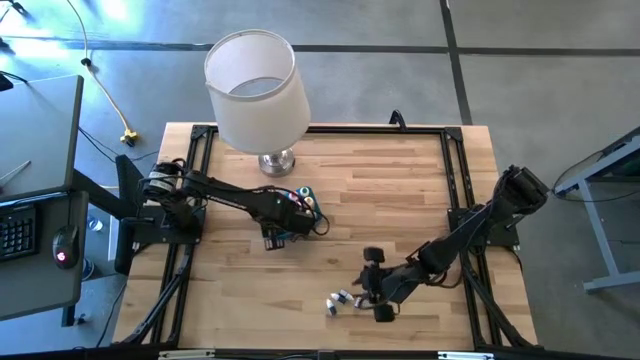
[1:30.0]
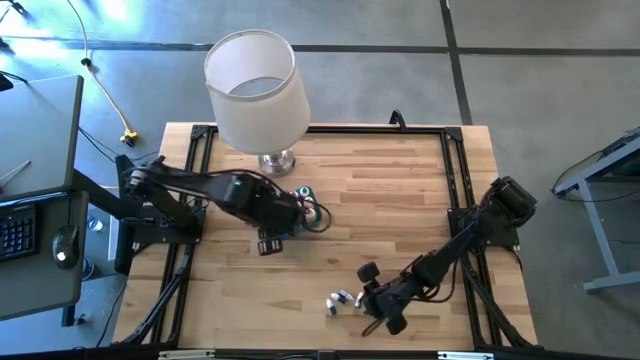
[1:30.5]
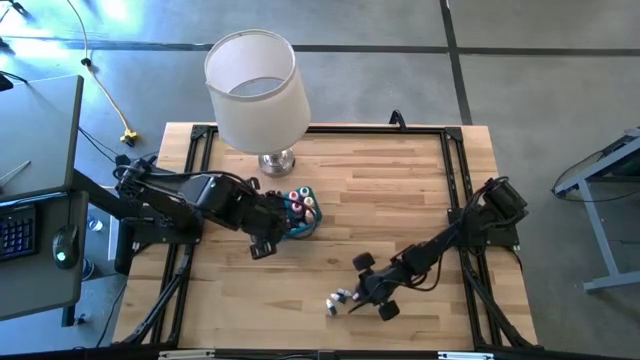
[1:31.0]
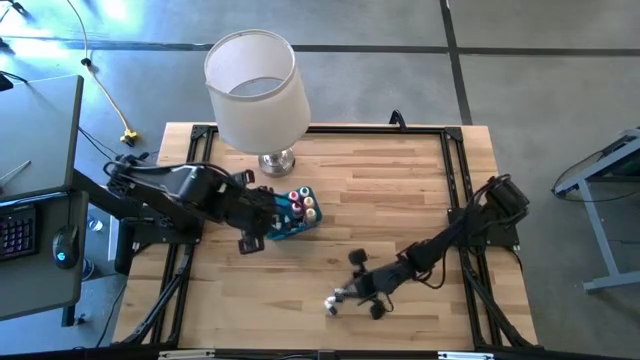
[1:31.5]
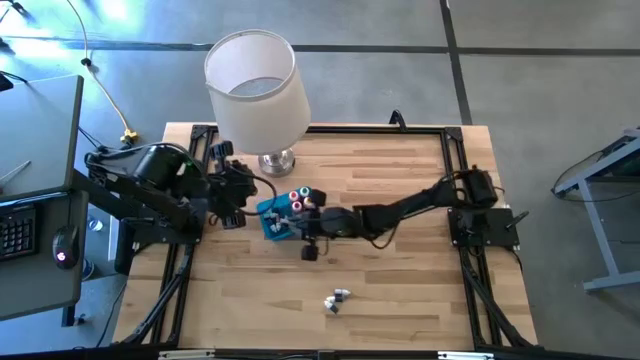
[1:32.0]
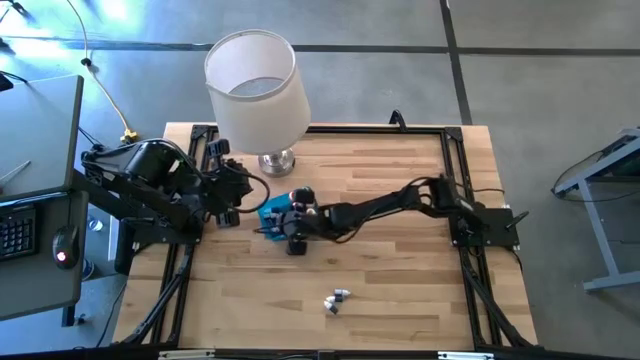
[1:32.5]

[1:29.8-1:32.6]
Task: Pick & Place food coloring
Put the small purple food coloring bottle into the blue bin

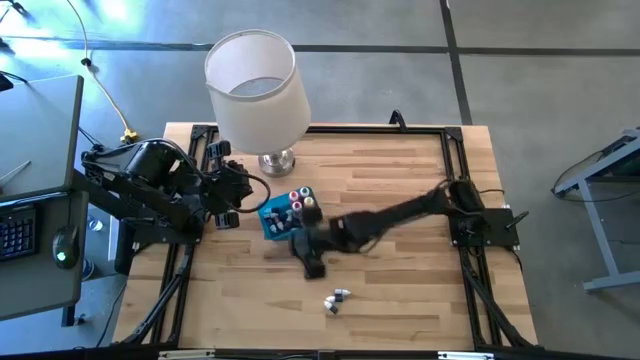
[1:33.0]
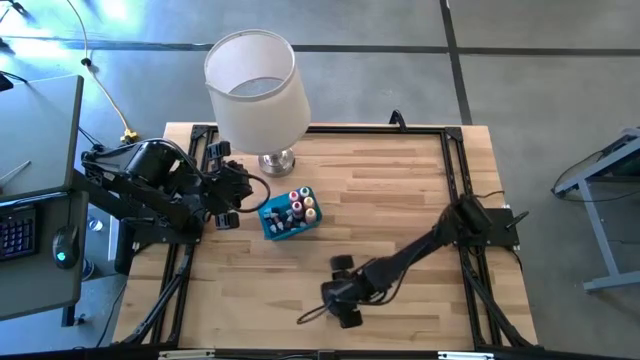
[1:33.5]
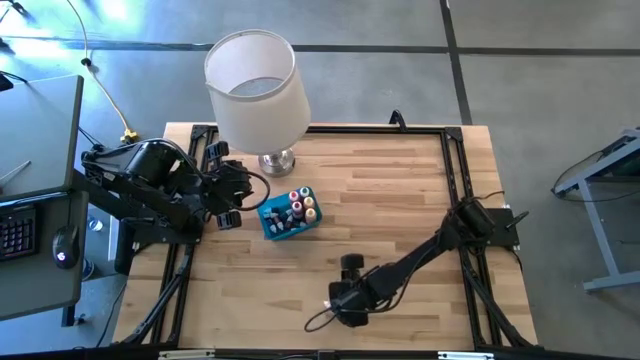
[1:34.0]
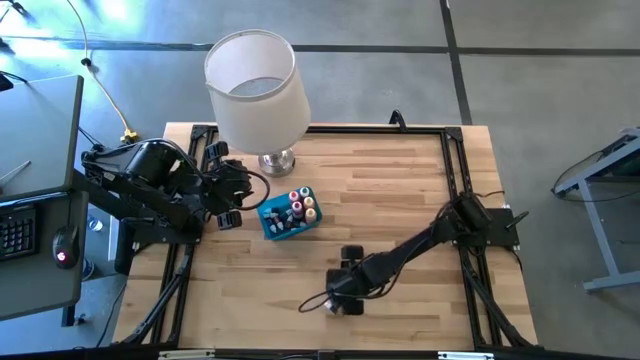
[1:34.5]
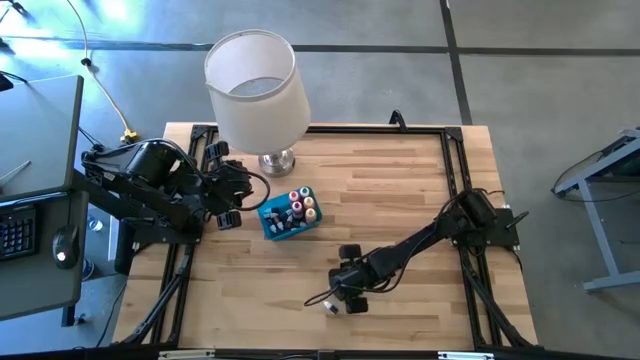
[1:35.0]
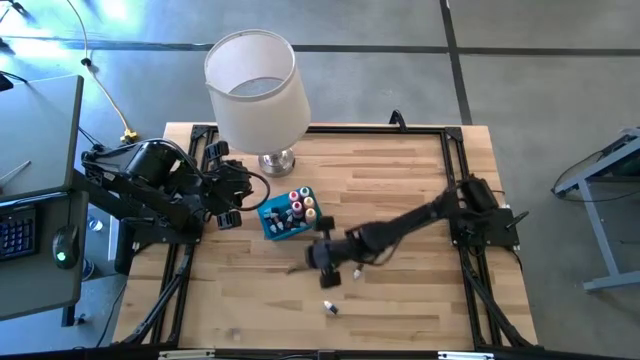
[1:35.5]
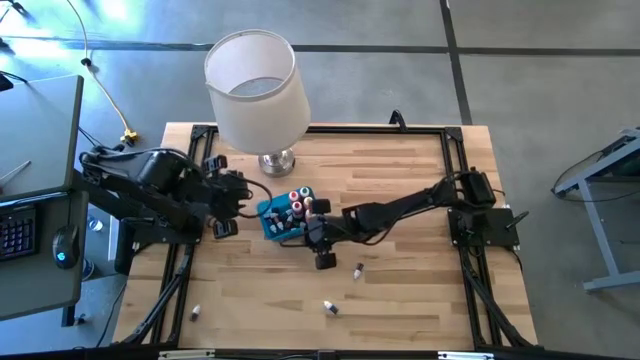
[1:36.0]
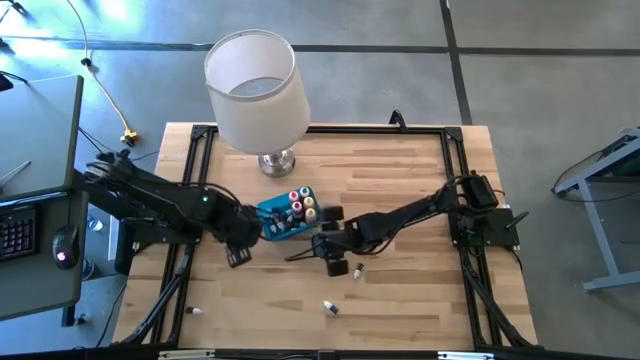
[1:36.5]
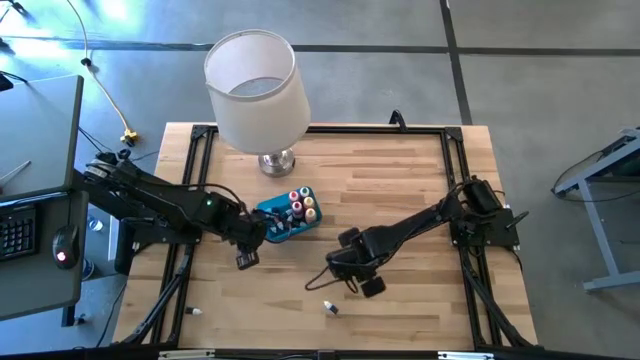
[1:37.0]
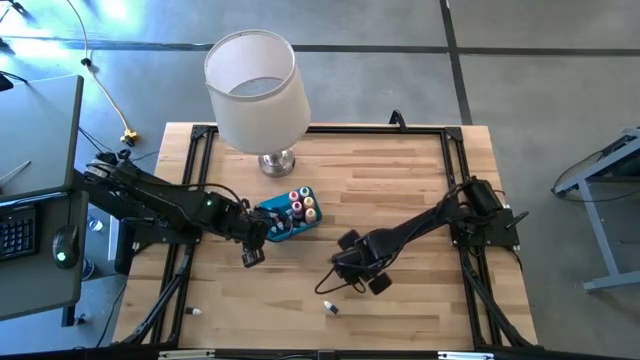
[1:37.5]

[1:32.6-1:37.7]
Put the small purple food coloring bottle into the blue bin

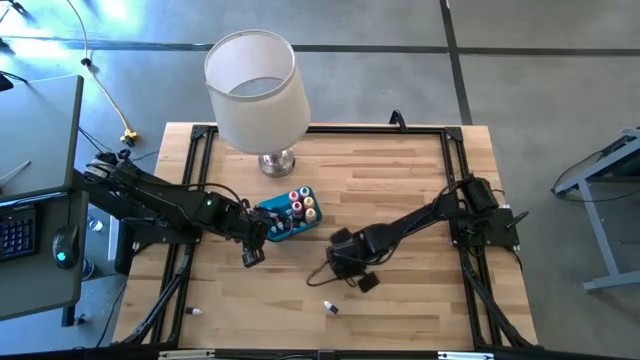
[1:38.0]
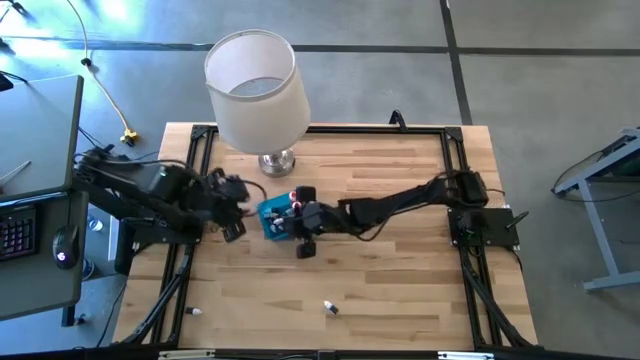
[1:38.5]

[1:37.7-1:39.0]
Put the small black food coloring bottle into the blue bin

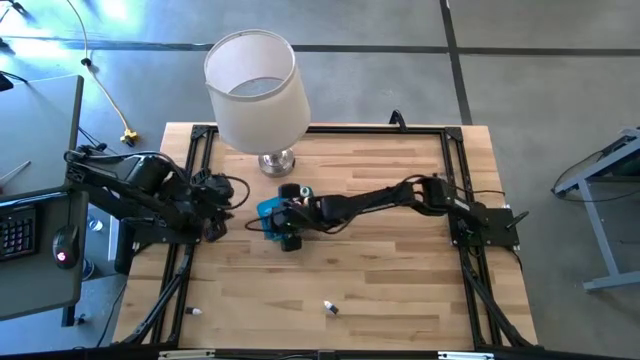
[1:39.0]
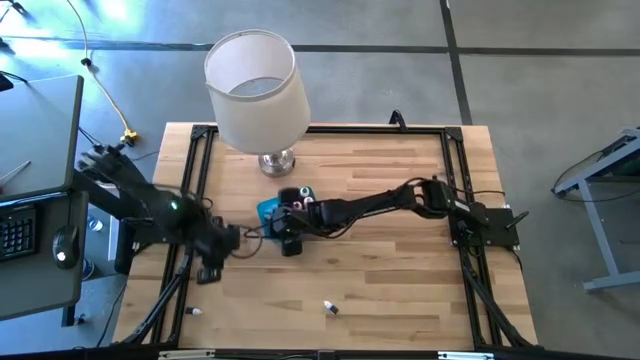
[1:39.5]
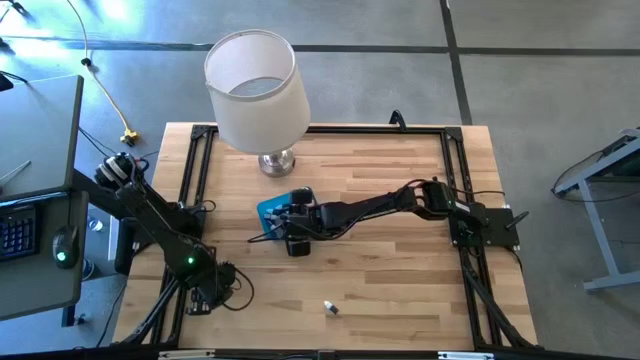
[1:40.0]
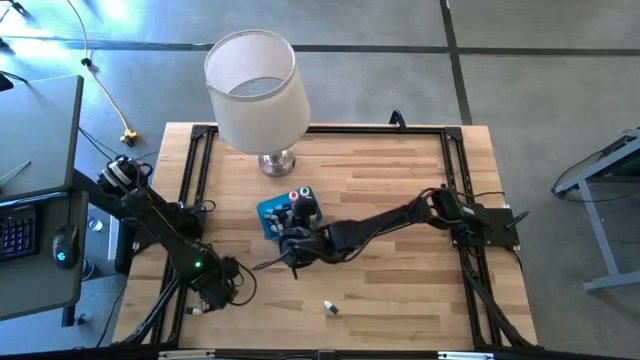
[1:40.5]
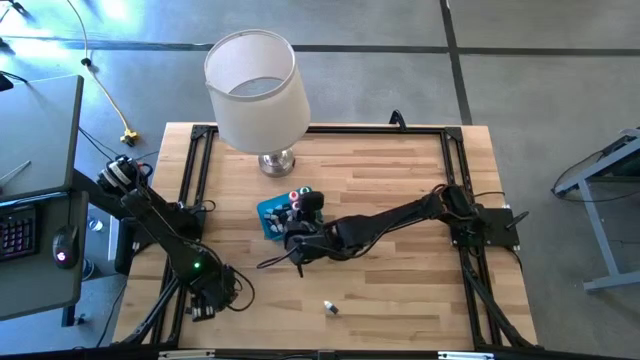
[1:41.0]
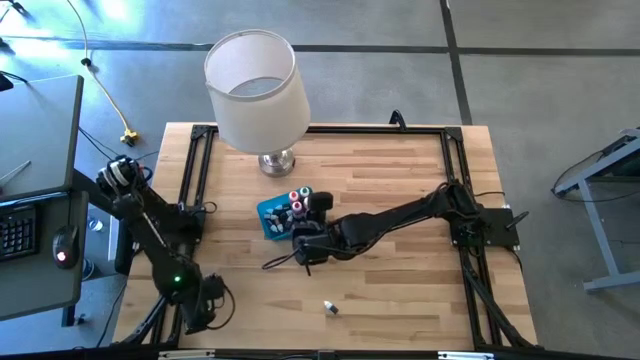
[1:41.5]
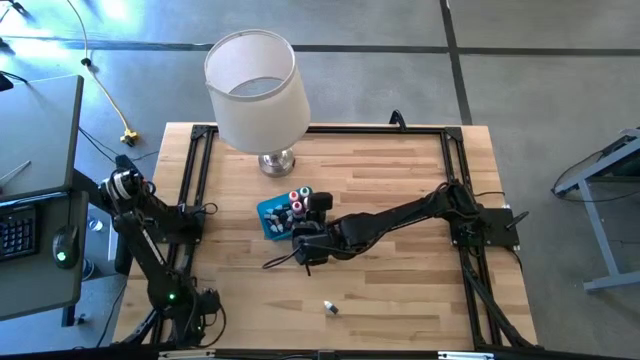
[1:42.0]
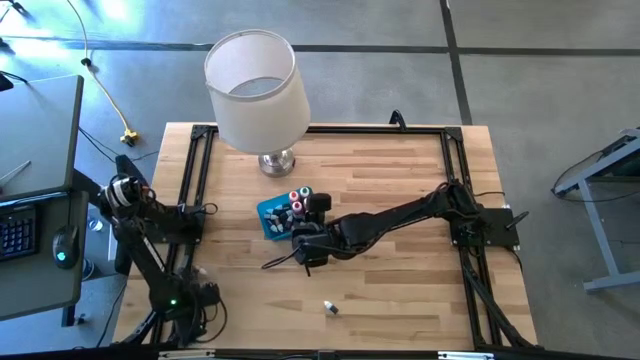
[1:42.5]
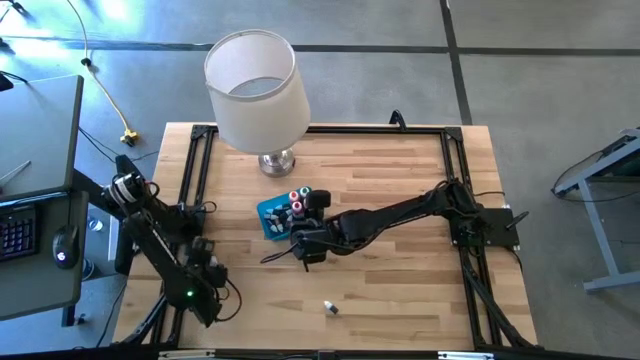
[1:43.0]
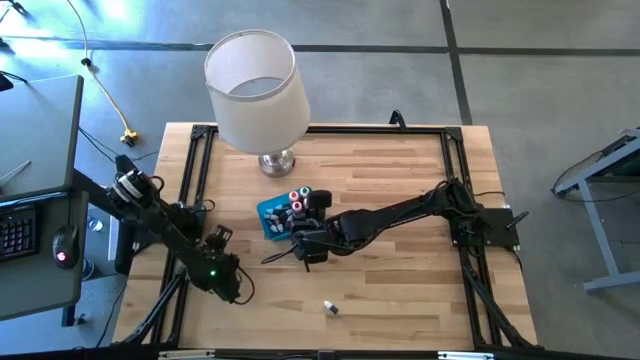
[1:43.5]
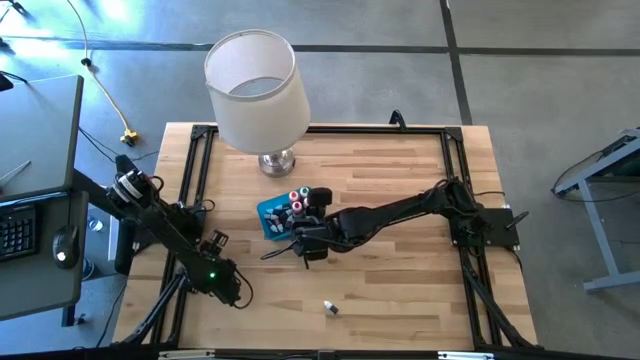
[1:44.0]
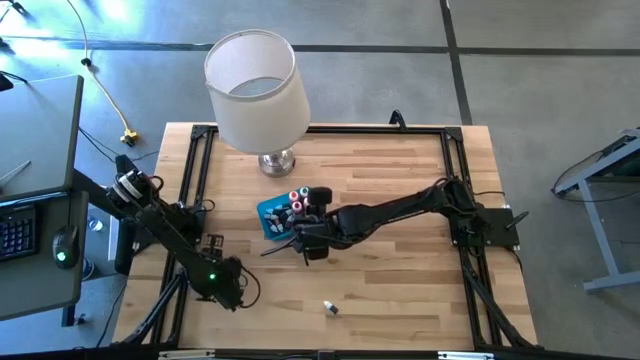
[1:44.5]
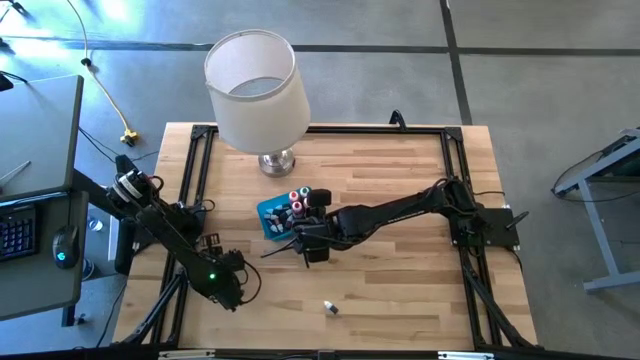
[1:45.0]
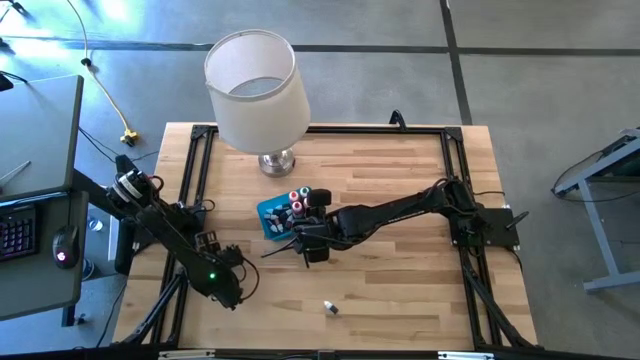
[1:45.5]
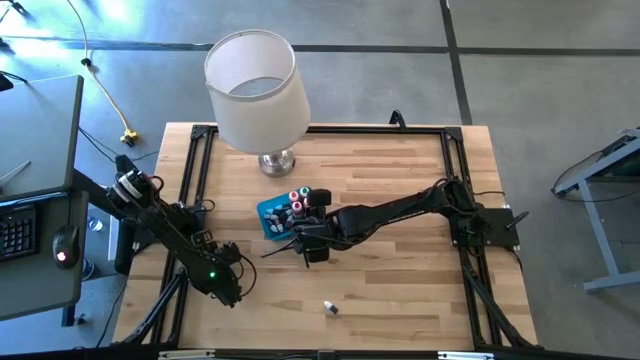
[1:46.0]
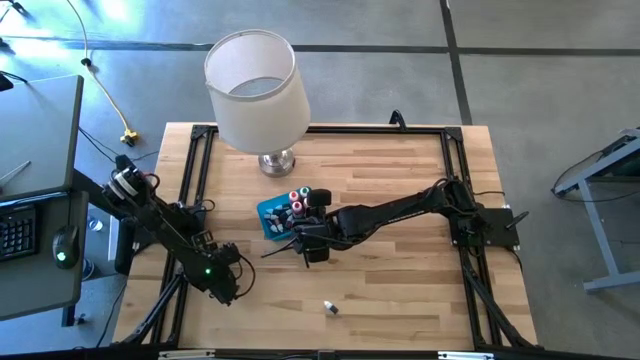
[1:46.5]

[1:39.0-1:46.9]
Put the small purple food coloring bottle into the blue bin

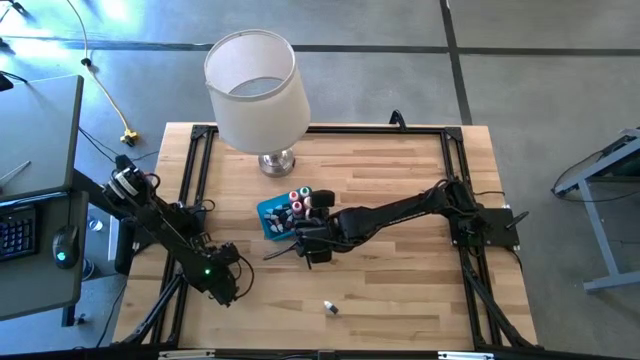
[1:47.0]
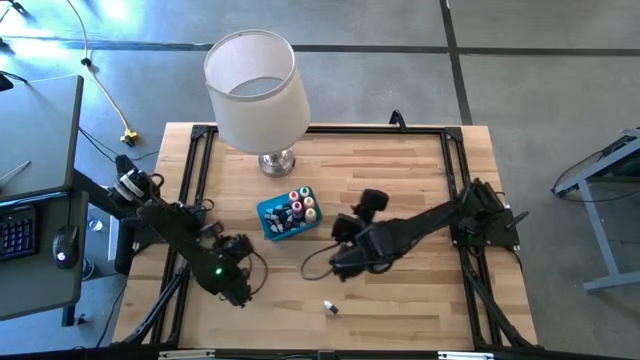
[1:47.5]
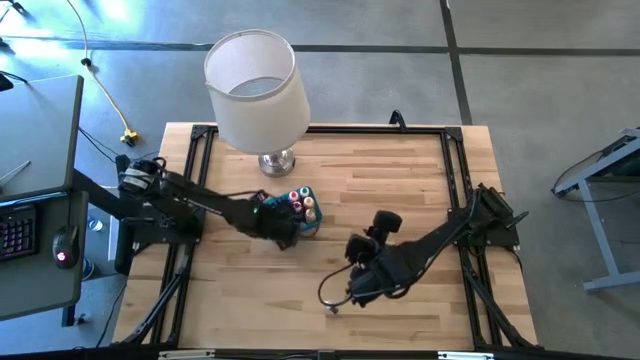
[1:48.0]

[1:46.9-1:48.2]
Put the small purple food coloring bottle into the blue bin

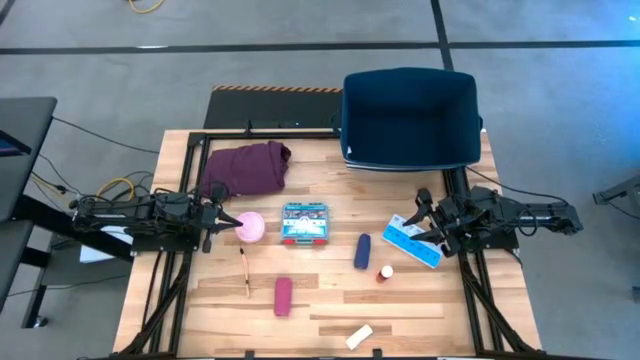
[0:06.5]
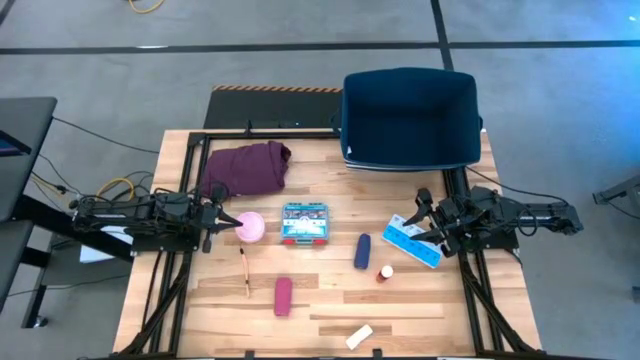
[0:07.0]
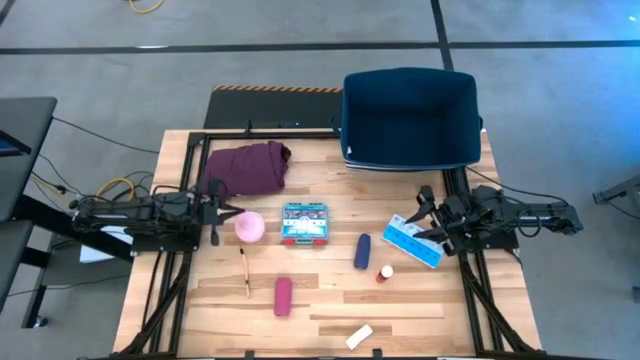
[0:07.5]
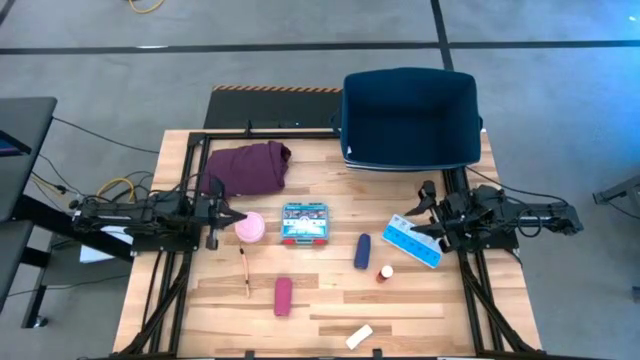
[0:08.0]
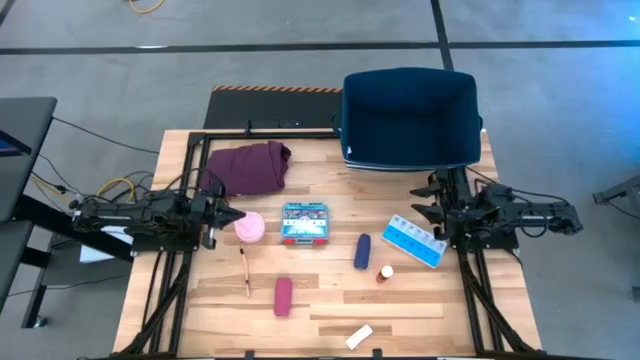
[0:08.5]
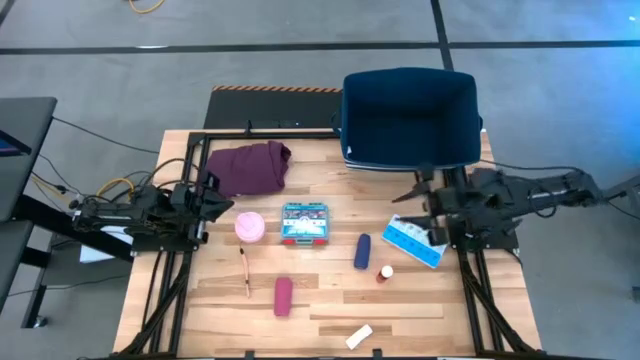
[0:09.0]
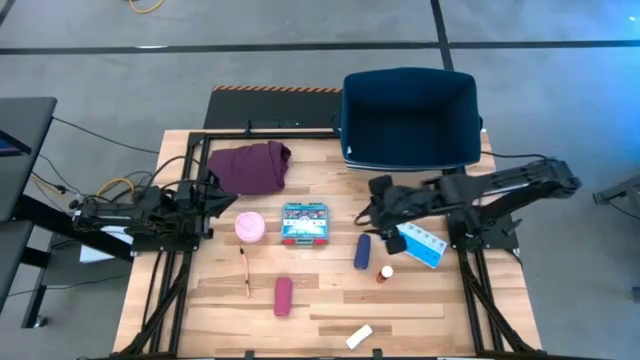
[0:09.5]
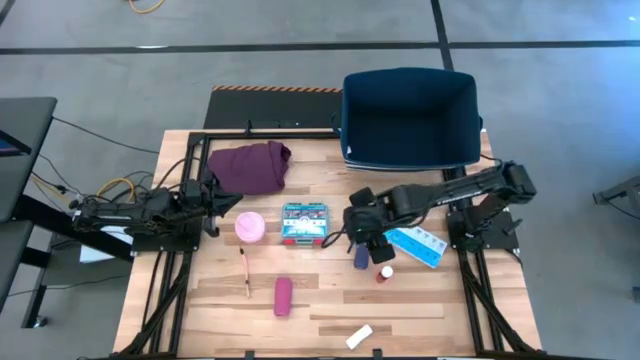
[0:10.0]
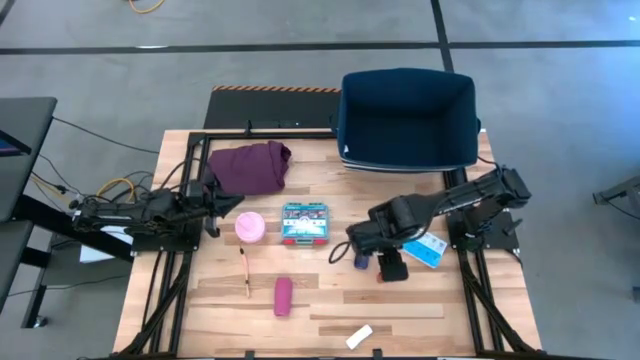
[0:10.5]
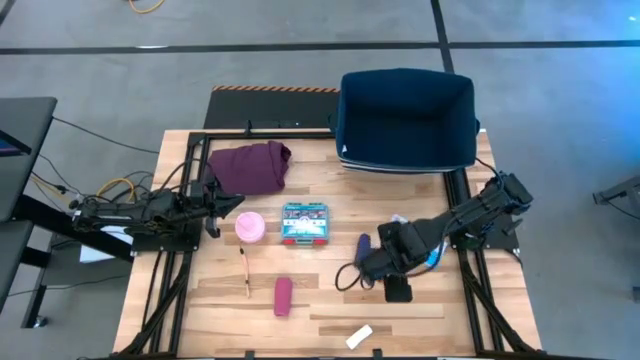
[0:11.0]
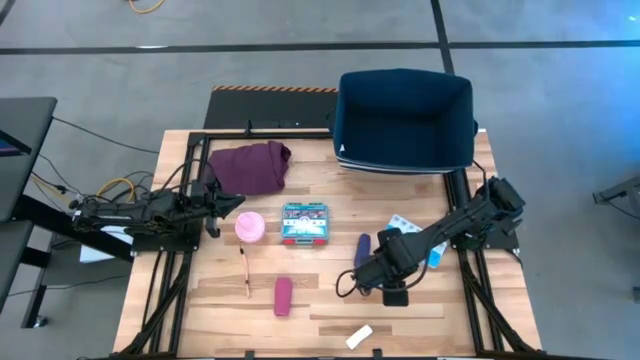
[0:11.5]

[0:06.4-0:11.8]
Task: Pick & place medical supplies in basket/bin
Put the red medicine bottle into the blue bin
